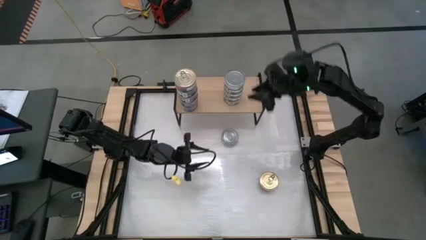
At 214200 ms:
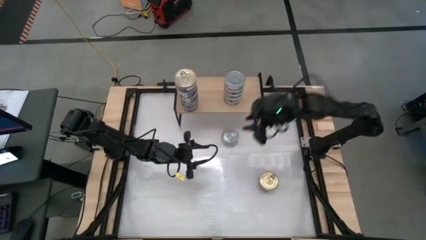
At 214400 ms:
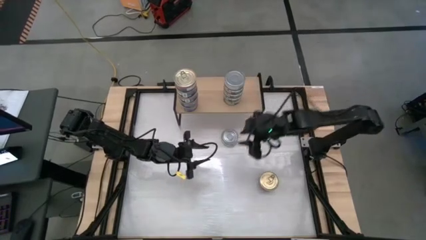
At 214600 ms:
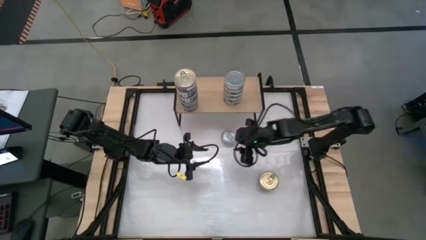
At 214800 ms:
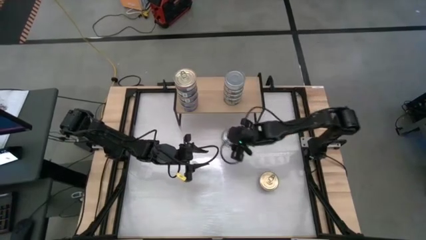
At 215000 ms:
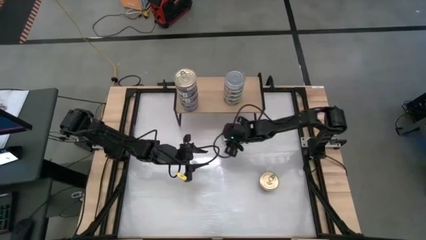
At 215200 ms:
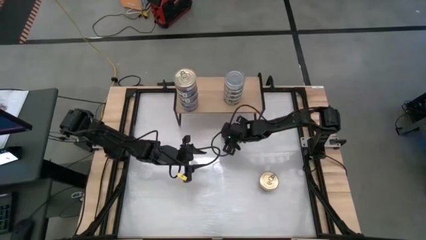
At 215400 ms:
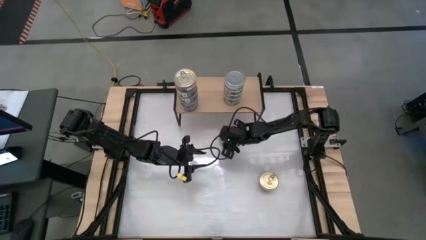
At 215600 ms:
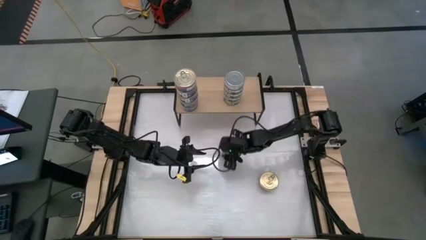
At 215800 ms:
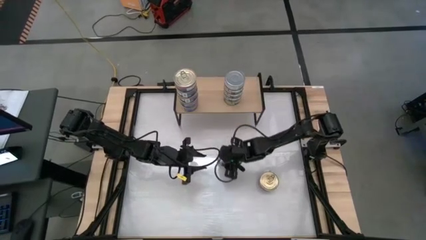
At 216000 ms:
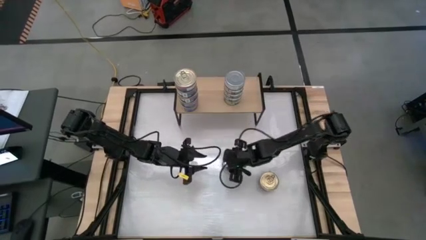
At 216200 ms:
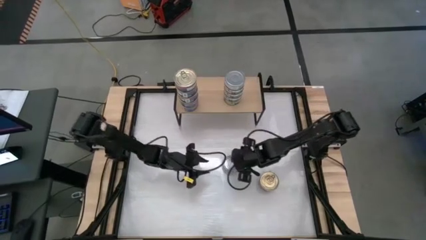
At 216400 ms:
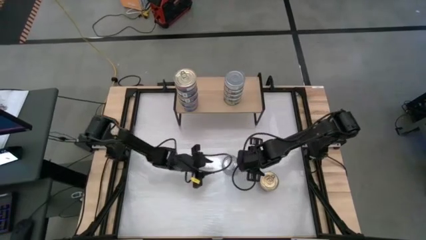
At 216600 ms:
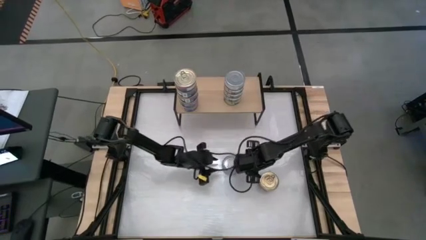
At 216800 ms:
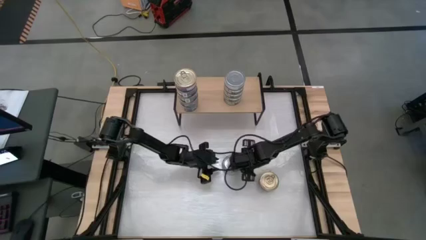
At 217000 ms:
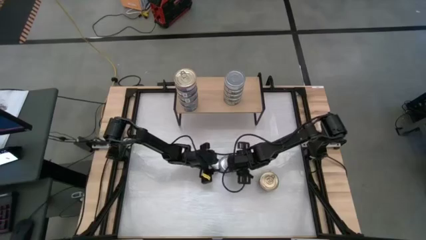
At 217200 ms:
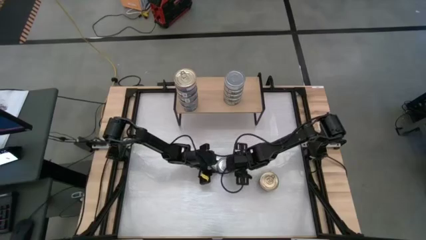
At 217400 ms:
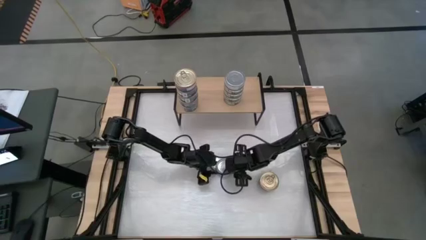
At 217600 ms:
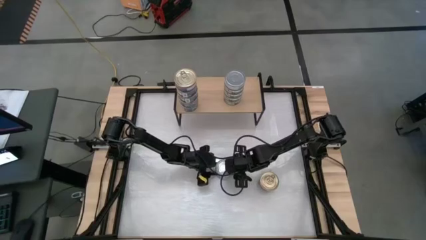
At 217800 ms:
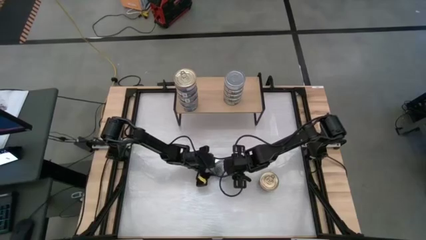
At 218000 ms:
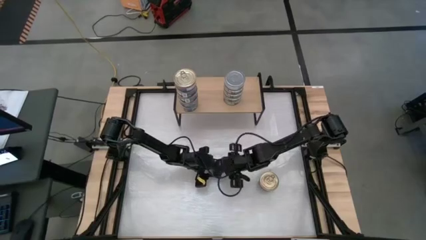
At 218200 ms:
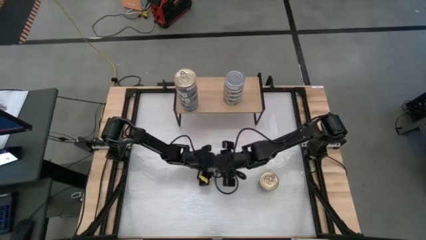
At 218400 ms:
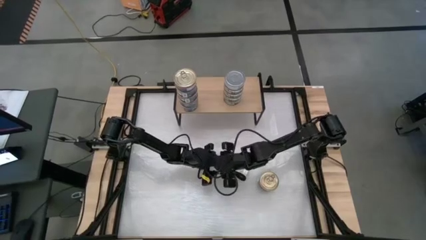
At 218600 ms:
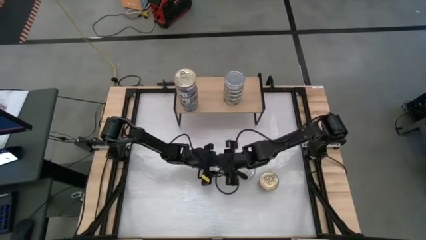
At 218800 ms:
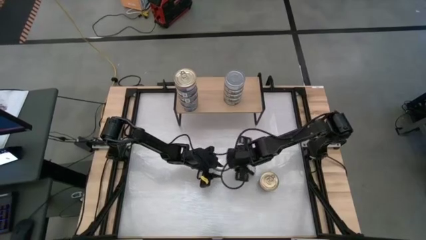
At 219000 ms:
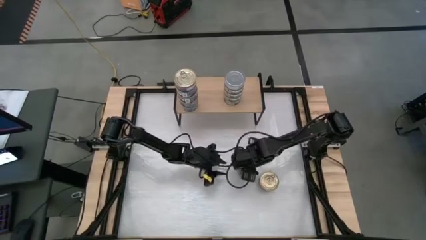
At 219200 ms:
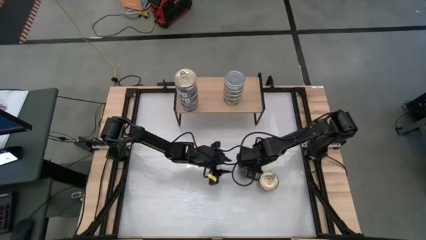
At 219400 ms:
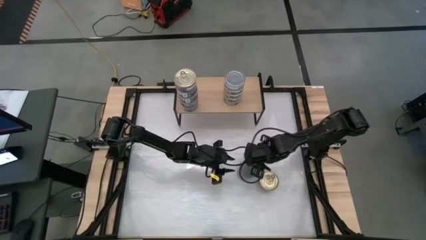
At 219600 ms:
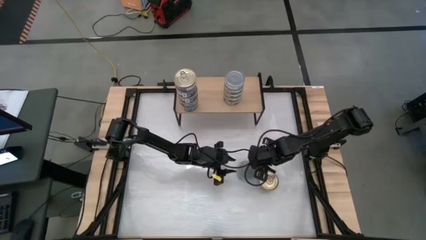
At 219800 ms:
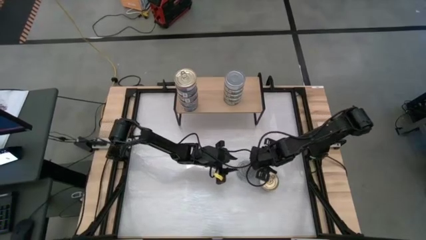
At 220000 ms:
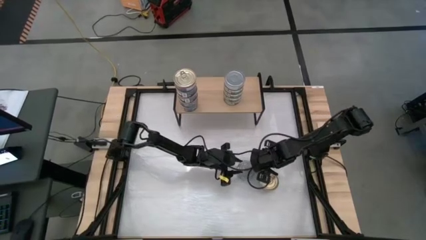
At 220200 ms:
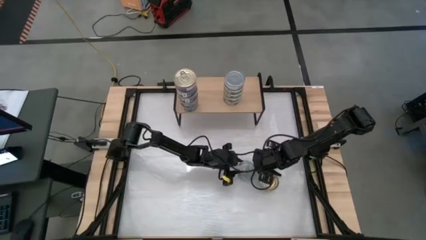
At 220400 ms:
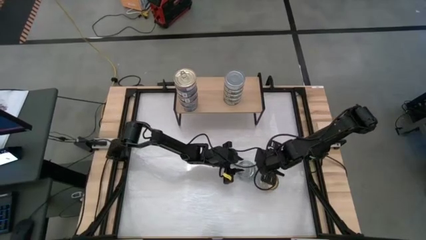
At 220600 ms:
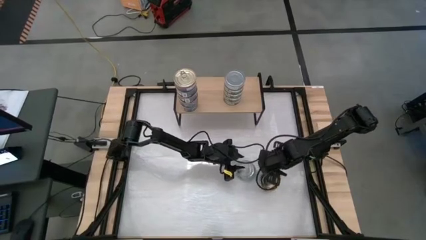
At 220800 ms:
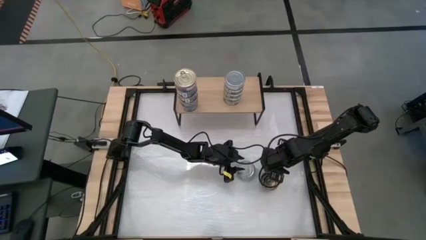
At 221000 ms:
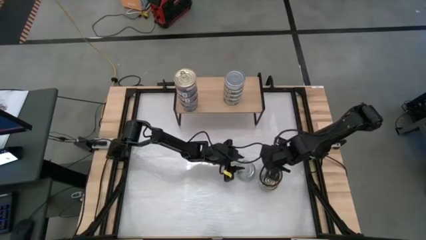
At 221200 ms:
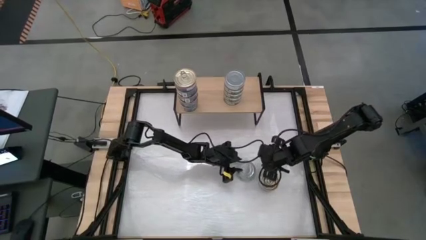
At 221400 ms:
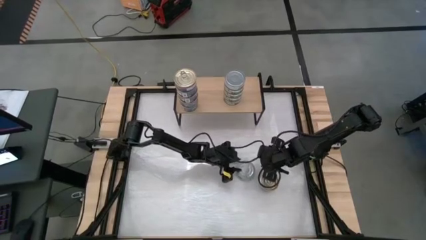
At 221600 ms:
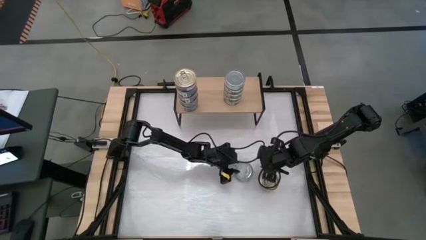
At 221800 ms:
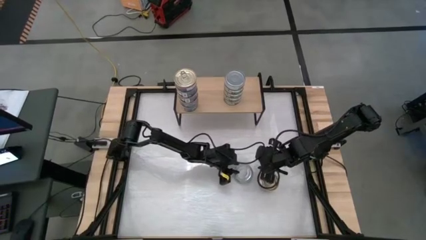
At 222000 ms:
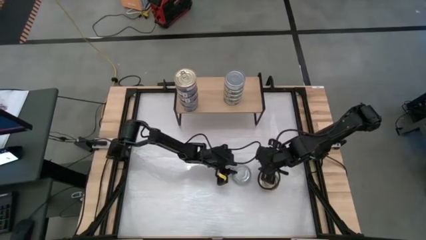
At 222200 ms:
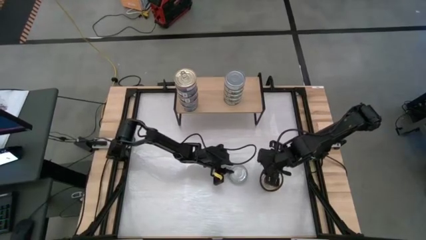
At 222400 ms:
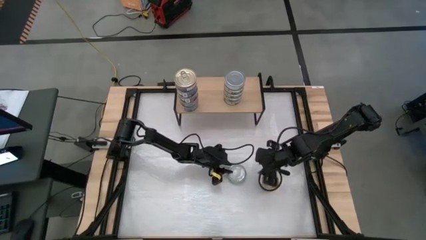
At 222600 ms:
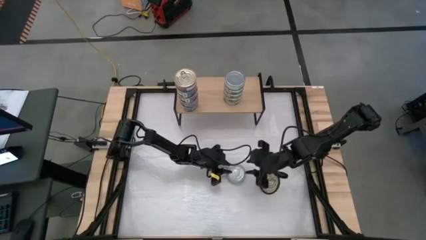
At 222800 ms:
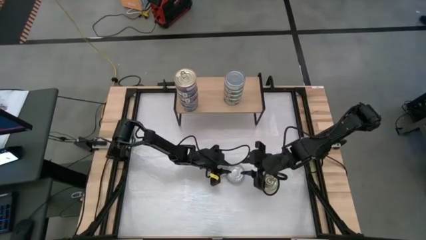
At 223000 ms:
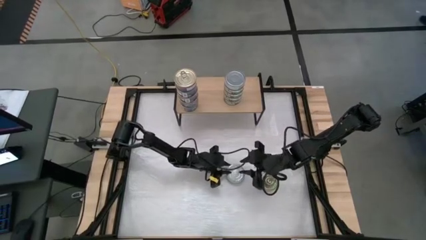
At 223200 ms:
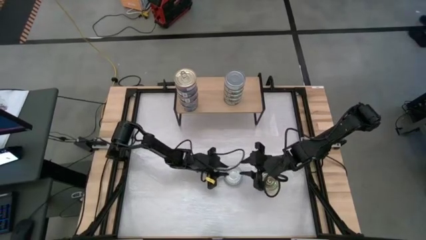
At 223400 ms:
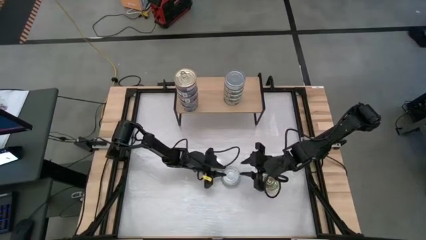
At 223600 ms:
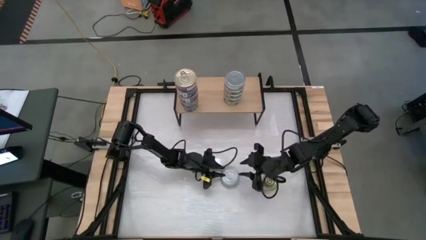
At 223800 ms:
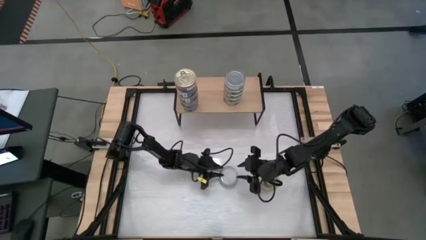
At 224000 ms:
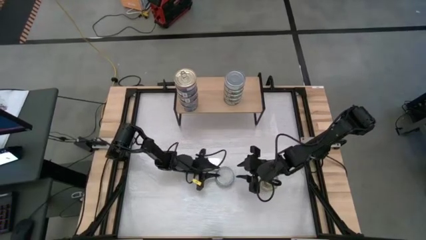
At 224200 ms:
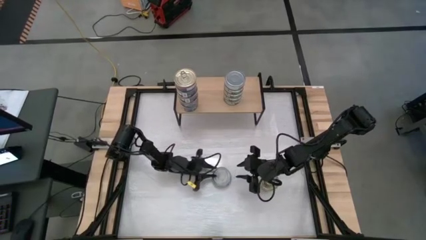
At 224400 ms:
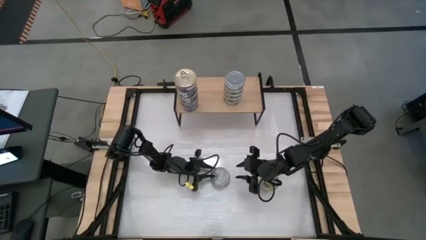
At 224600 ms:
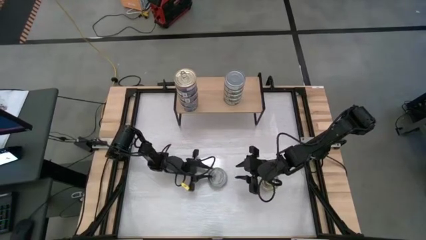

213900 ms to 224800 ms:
Task: Stack canned seafood by type on shelf
Stack the green tuna can on top of the other green tuna cans on the shelf

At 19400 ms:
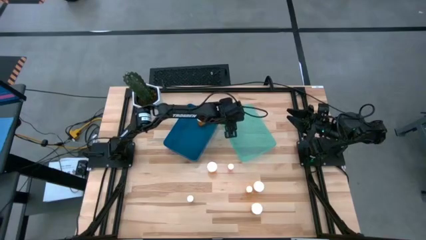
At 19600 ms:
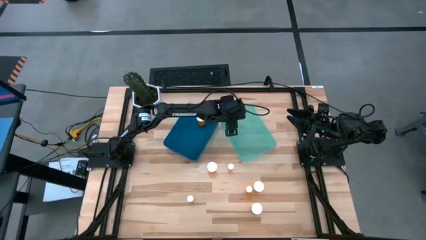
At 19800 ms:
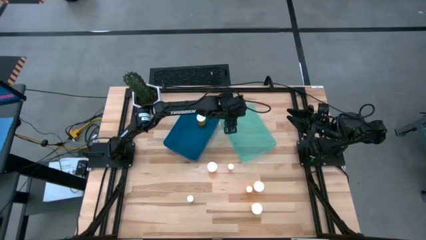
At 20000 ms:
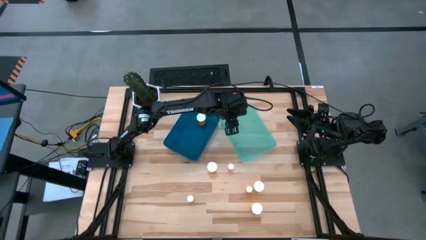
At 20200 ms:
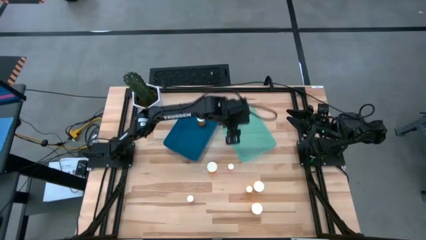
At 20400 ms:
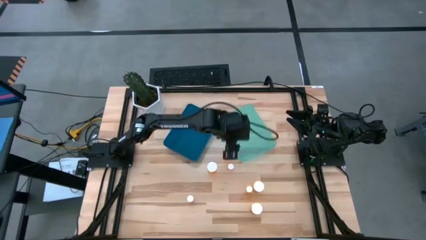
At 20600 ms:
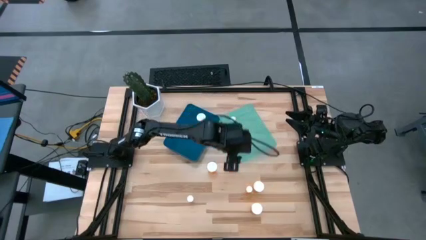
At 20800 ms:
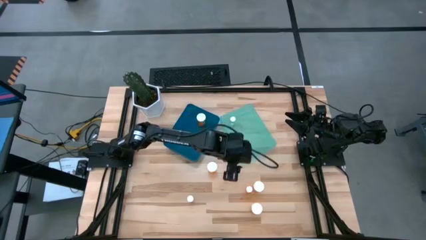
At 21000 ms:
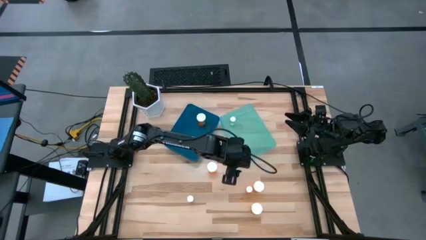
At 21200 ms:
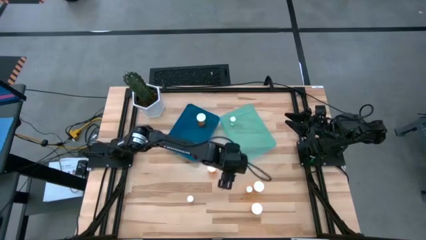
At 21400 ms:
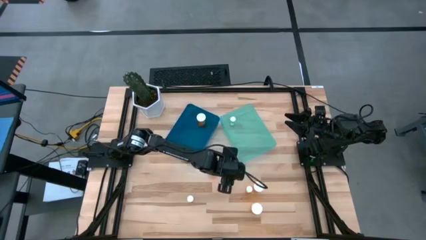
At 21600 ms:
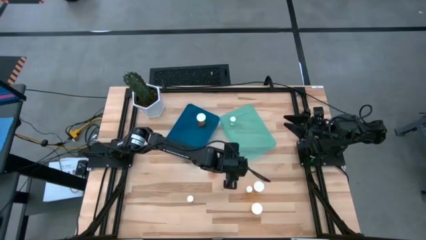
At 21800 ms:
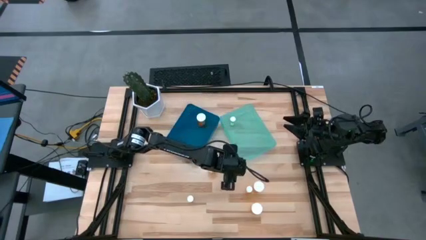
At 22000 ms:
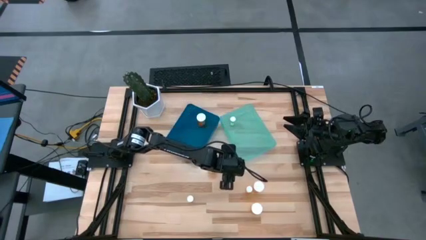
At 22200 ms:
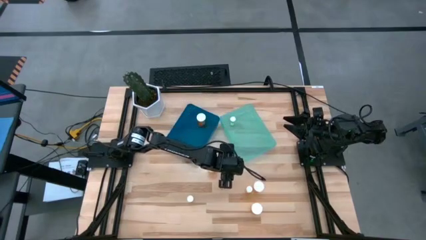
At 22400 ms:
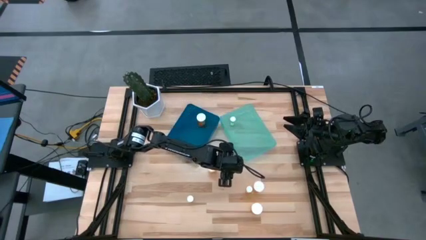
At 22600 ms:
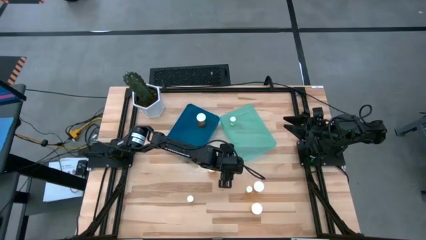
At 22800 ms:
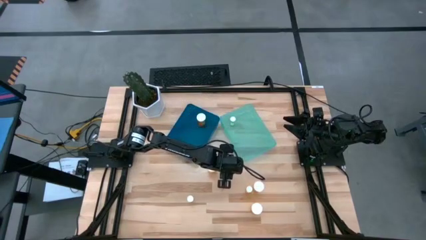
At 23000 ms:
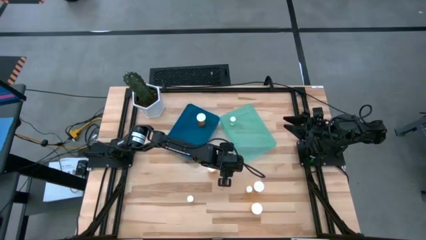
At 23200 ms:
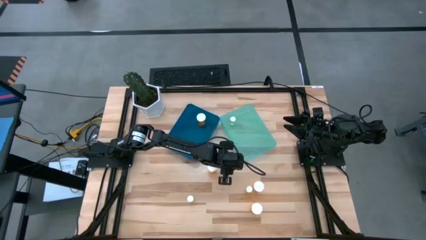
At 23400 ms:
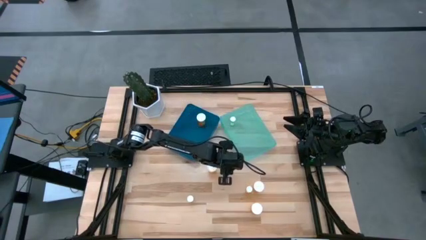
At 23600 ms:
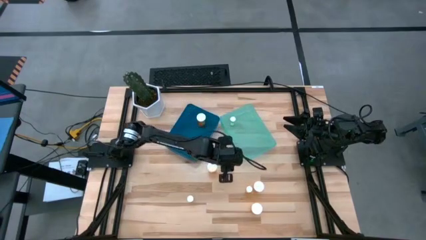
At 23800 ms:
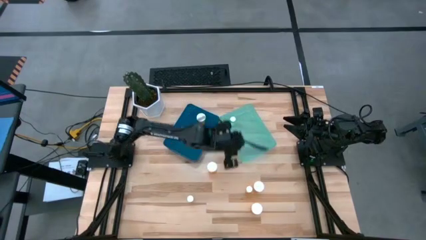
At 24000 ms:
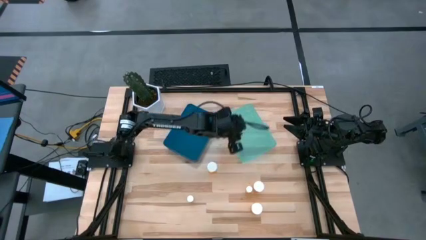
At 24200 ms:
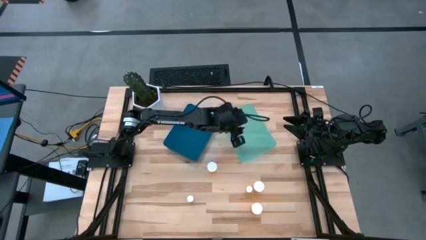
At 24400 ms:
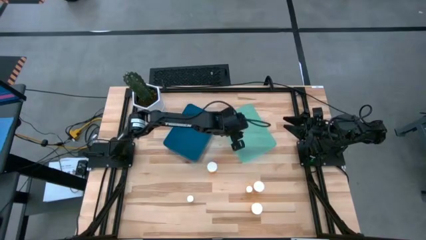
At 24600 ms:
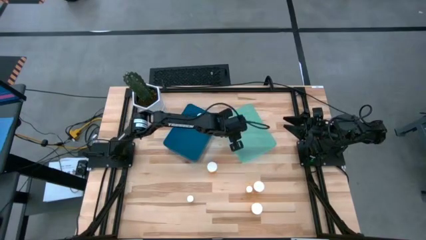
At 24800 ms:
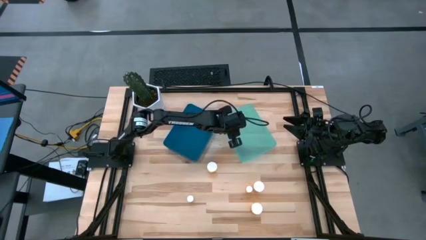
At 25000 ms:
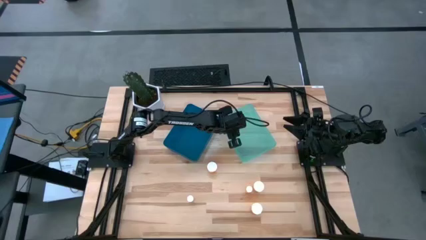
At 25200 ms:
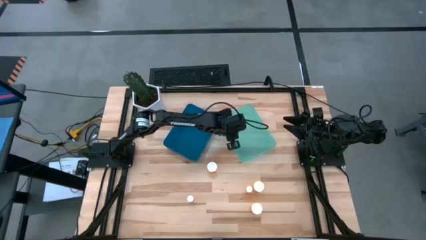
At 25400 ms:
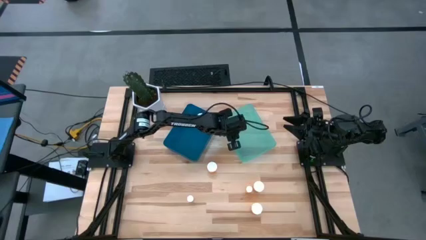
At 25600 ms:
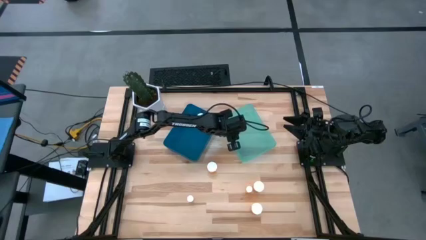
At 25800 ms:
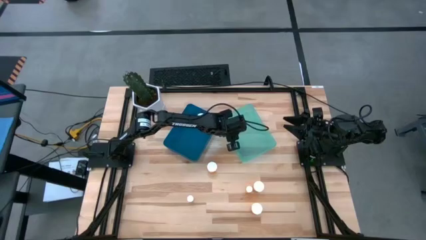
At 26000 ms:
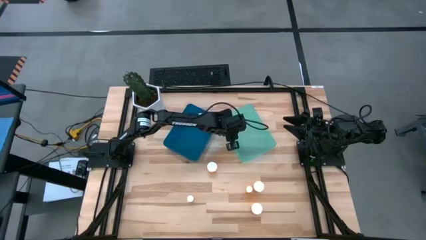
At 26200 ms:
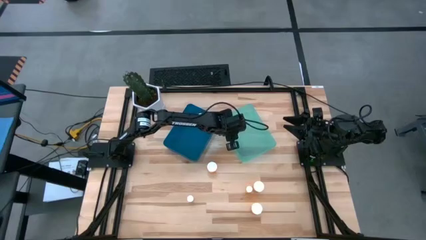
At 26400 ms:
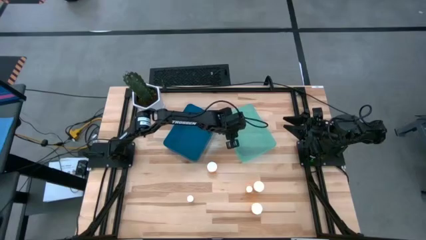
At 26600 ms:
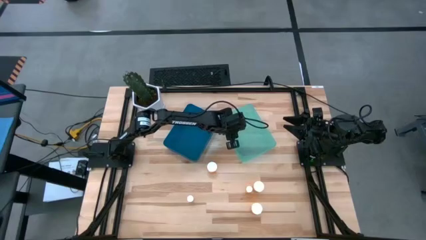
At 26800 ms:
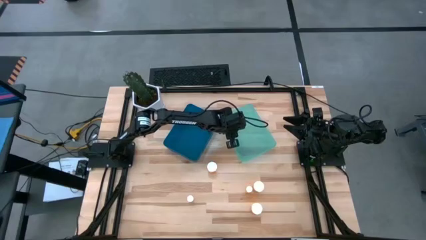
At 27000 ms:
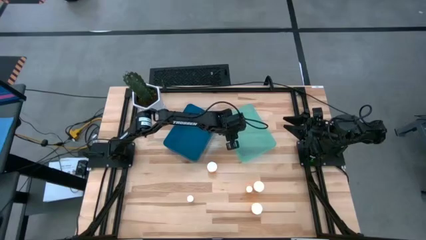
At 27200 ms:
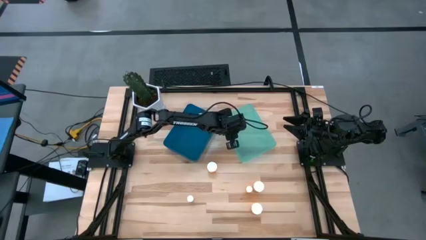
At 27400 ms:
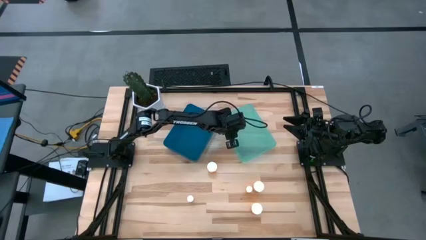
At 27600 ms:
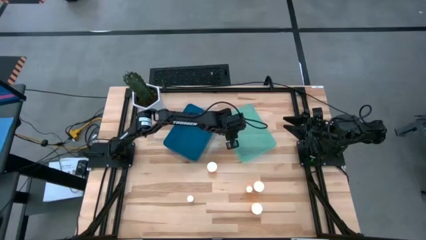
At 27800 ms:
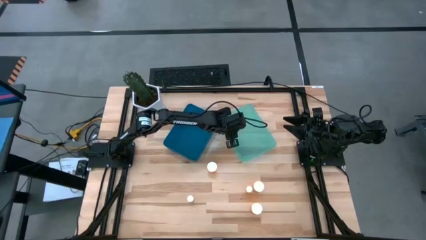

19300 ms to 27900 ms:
Task: Pick and place medicine bottles into bin by pill shape (circle, oval)
Put the pink pill bottle into the green bin
